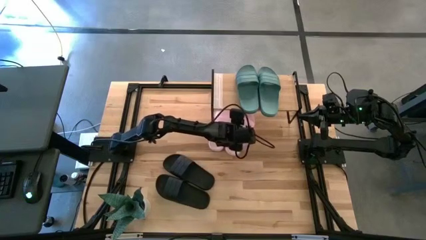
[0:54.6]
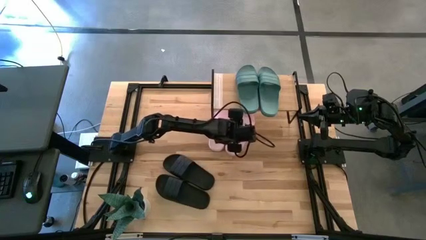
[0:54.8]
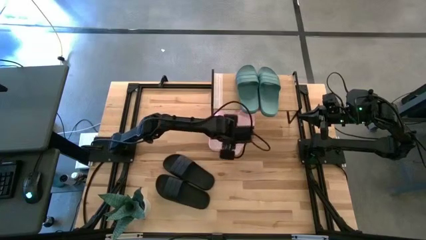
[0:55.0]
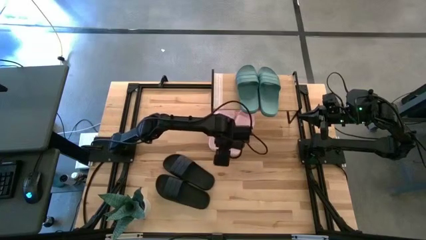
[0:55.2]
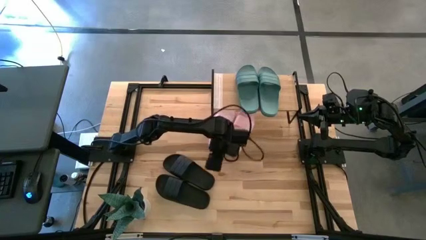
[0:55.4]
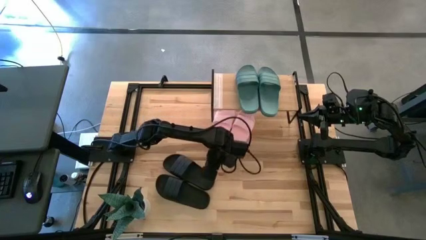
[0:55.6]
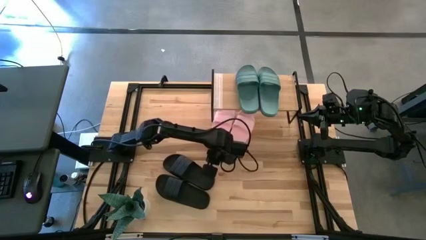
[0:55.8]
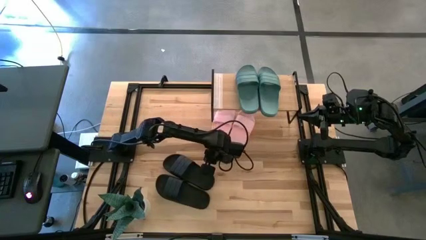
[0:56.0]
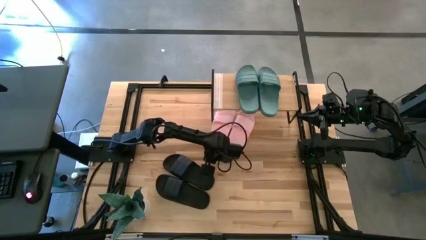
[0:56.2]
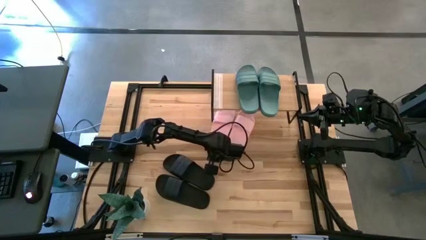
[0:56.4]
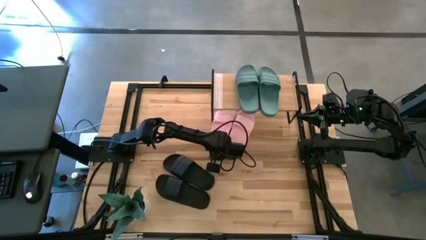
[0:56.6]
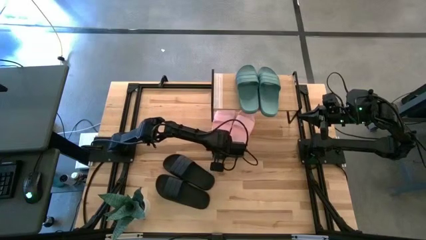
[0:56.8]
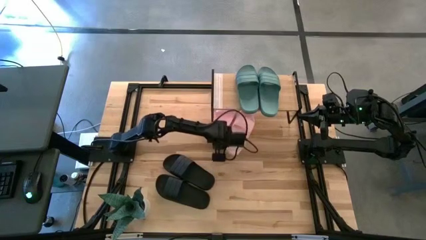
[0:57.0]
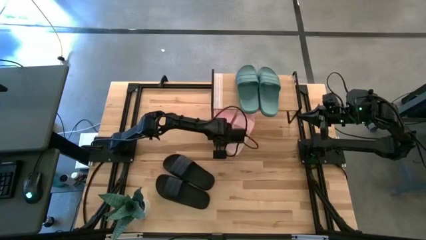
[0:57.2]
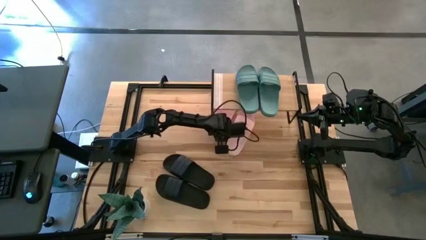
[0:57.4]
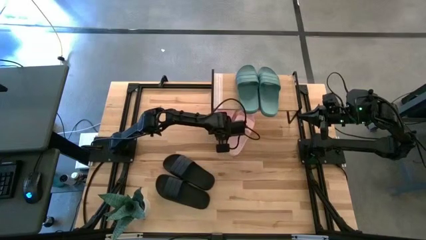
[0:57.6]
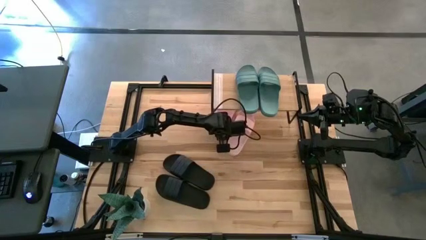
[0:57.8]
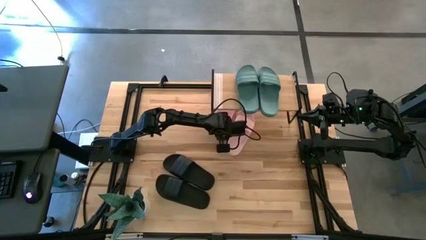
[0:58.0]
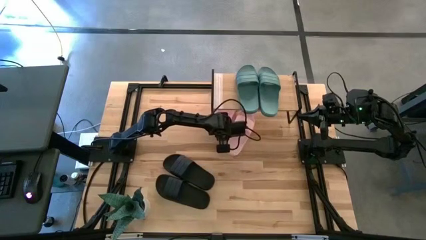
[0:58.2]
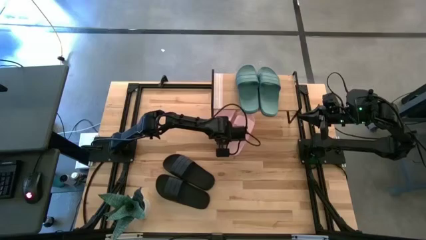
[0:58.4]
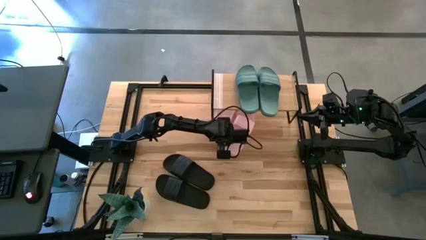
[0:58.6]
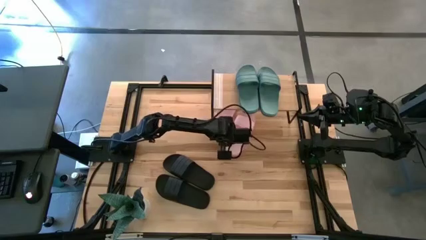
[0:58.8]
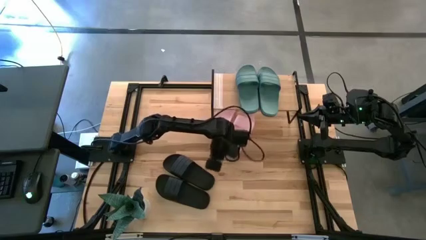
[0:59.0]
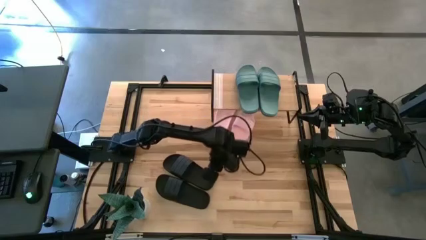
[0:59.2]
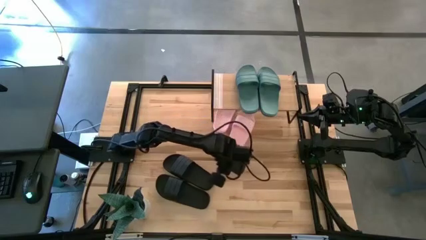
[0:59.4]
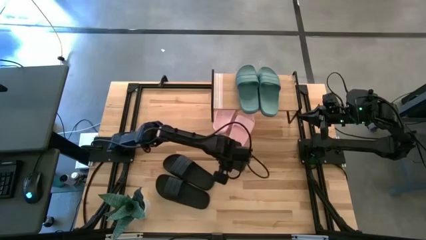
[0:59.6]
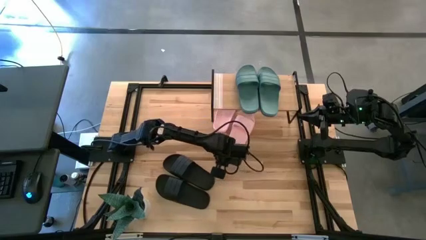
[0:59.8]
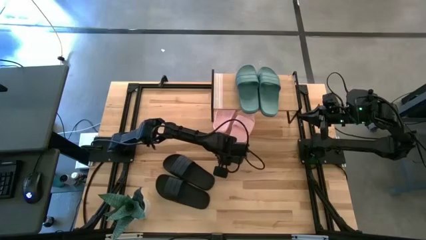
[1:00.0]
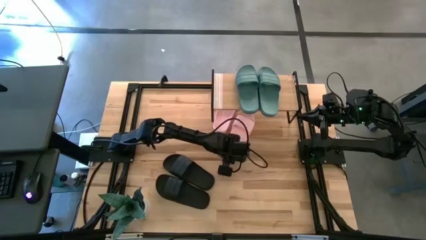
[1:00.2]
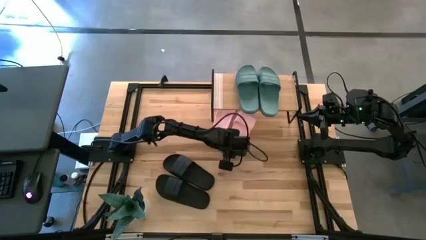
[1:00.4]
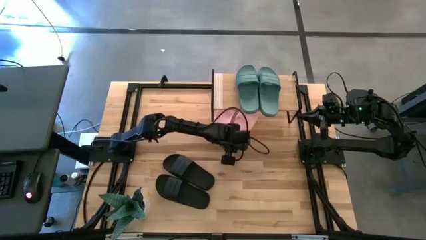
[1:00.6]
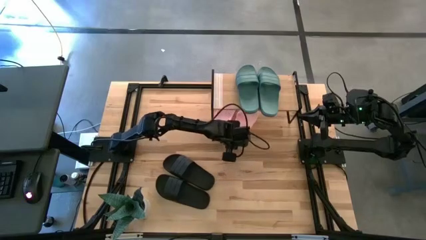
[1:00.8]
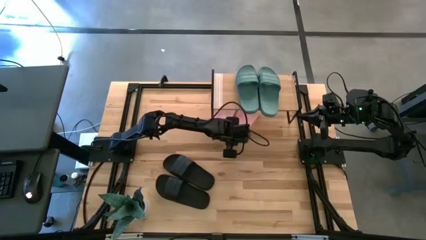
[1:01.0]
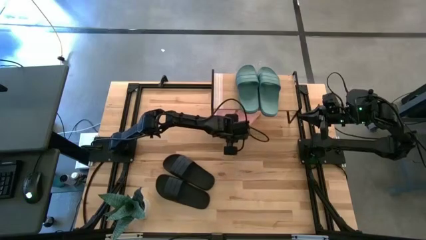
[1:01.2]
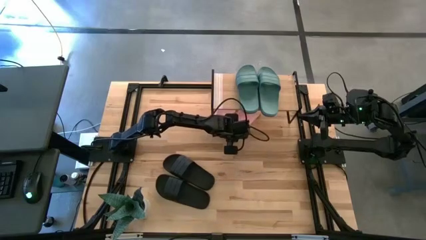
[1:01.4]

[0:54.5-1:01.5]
Task: Pick and place slides into the shelf
Adjust the pink slide under the shelf

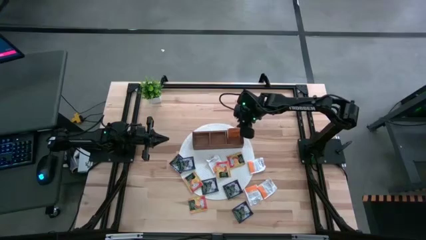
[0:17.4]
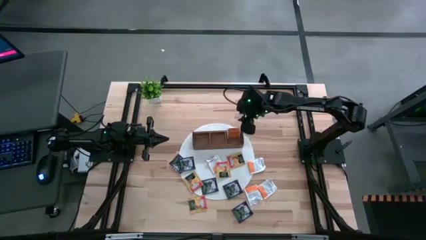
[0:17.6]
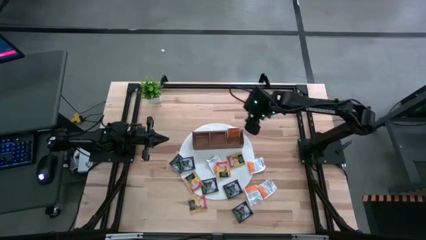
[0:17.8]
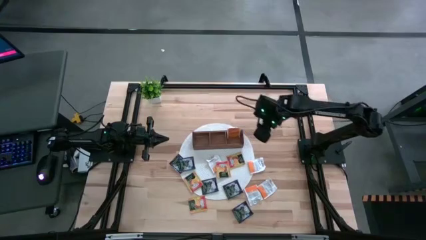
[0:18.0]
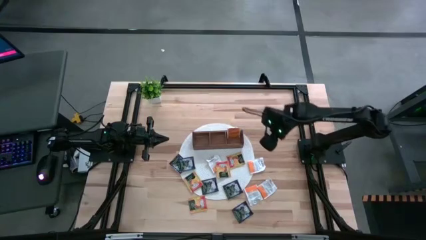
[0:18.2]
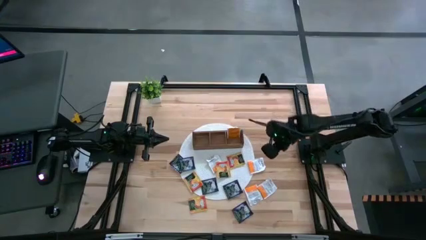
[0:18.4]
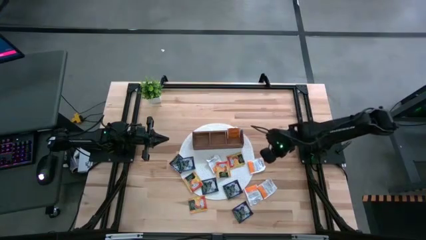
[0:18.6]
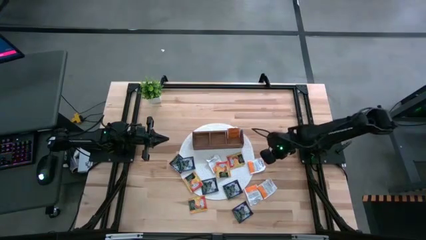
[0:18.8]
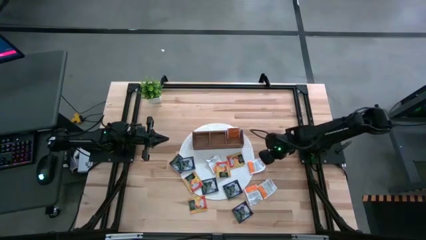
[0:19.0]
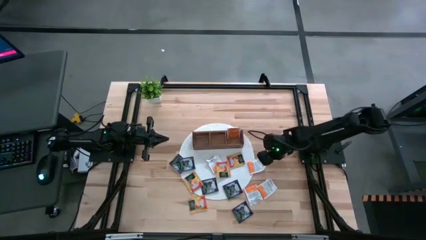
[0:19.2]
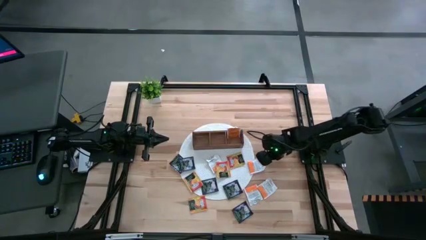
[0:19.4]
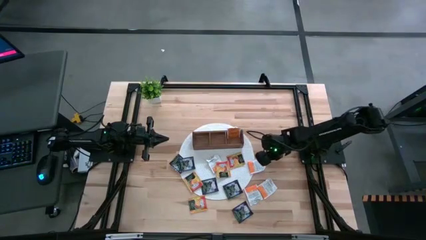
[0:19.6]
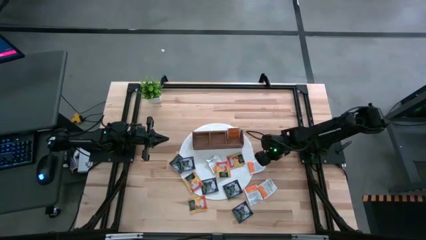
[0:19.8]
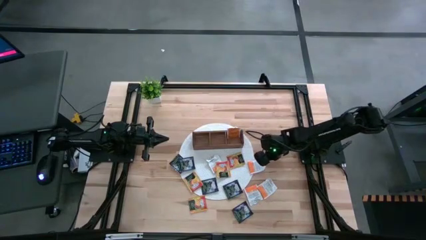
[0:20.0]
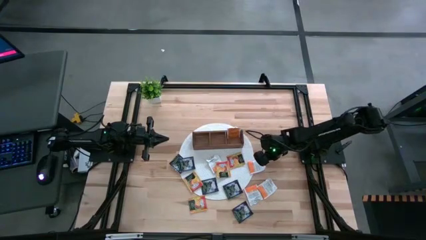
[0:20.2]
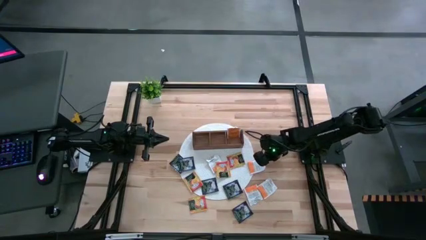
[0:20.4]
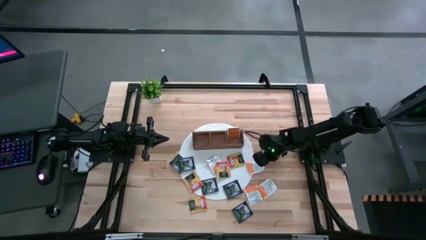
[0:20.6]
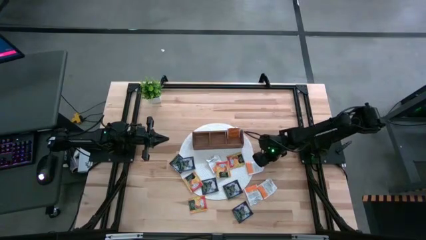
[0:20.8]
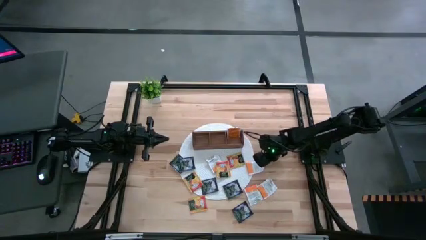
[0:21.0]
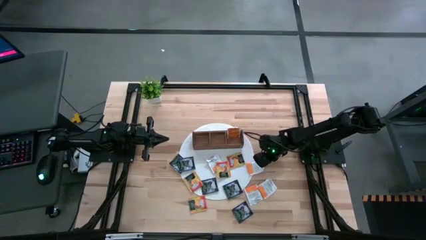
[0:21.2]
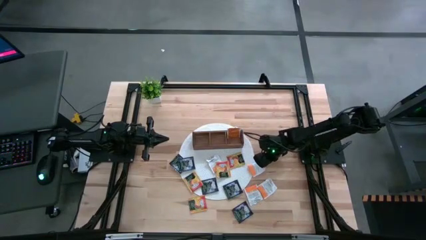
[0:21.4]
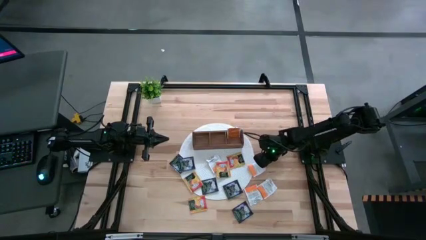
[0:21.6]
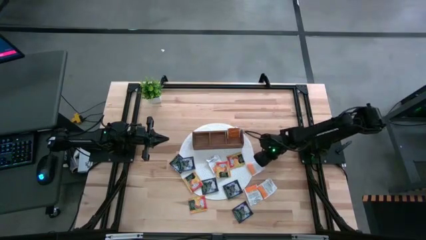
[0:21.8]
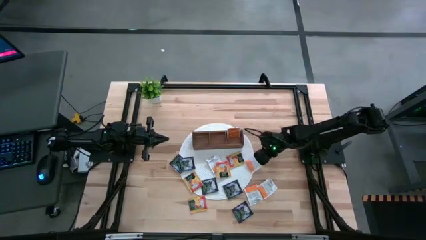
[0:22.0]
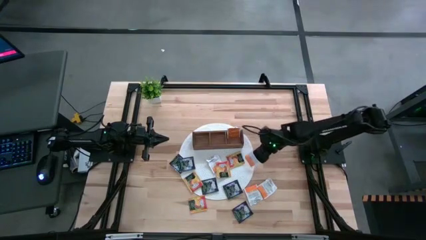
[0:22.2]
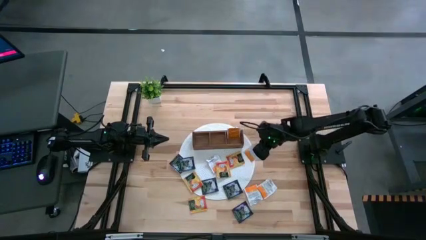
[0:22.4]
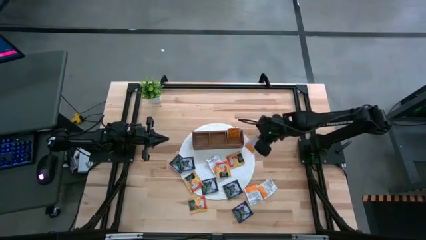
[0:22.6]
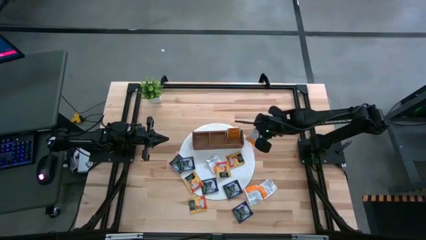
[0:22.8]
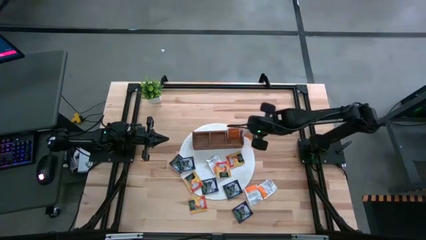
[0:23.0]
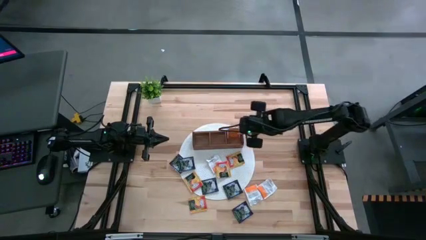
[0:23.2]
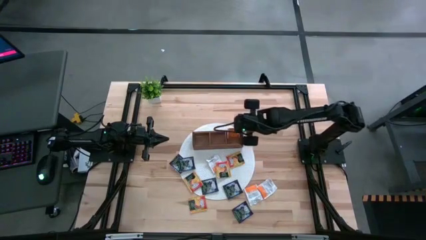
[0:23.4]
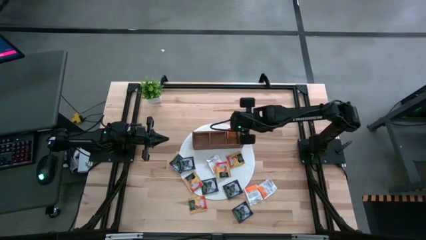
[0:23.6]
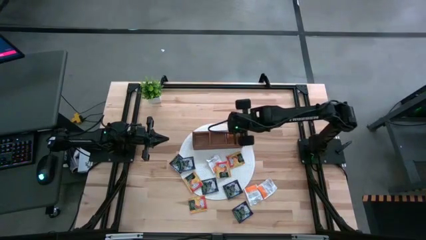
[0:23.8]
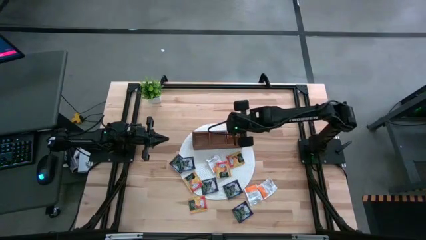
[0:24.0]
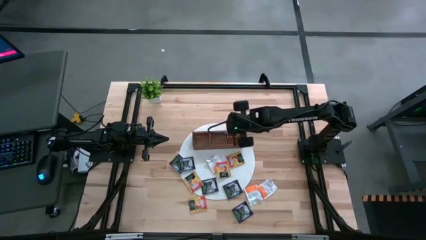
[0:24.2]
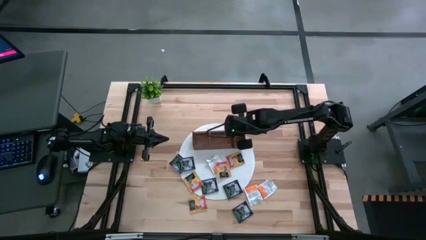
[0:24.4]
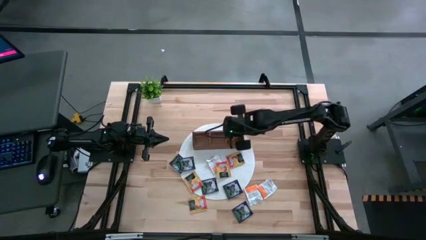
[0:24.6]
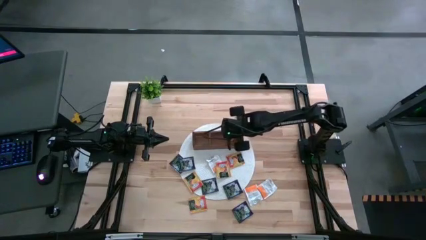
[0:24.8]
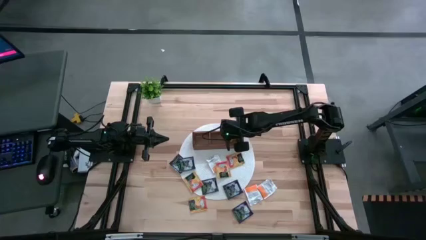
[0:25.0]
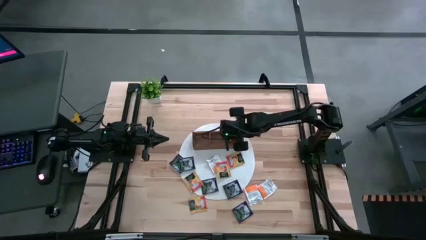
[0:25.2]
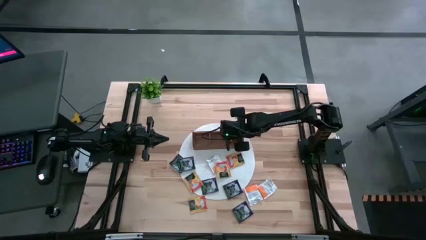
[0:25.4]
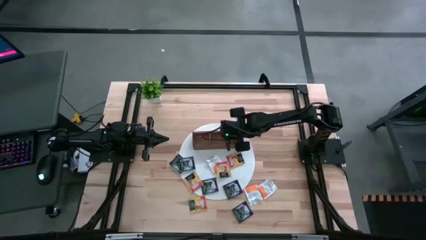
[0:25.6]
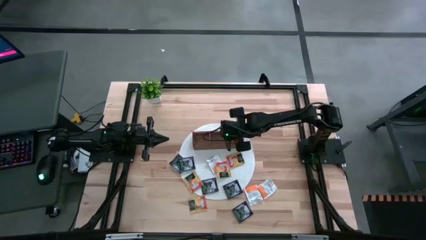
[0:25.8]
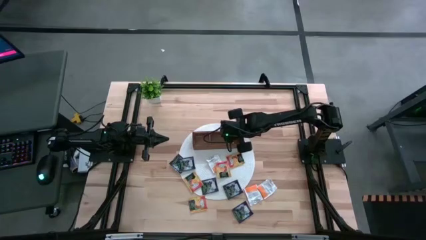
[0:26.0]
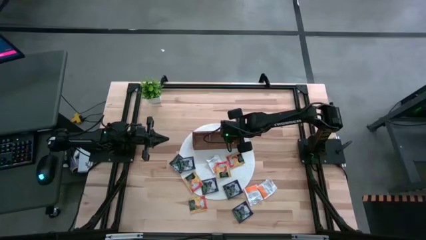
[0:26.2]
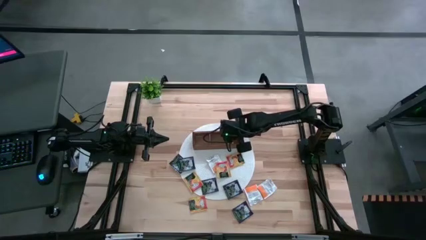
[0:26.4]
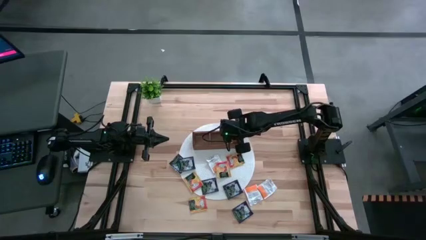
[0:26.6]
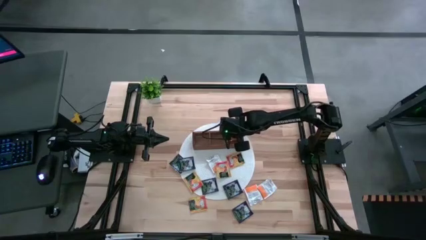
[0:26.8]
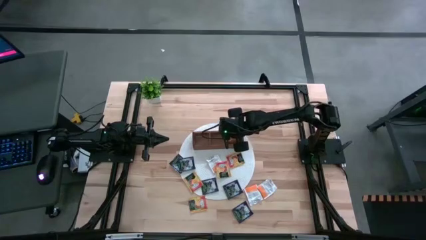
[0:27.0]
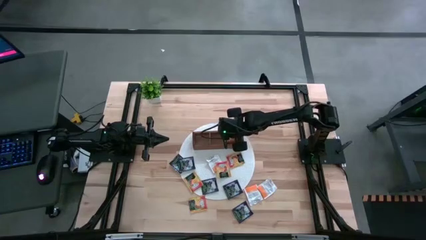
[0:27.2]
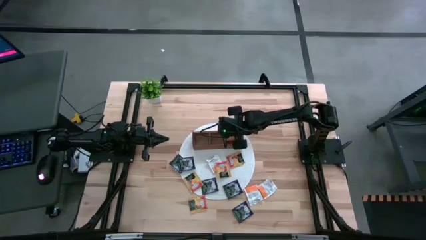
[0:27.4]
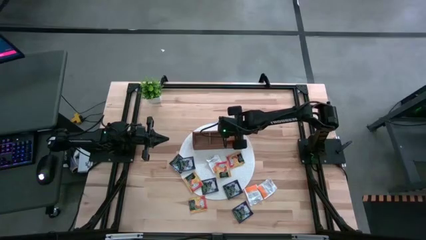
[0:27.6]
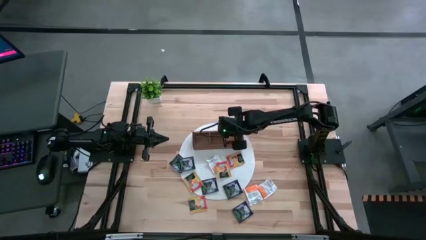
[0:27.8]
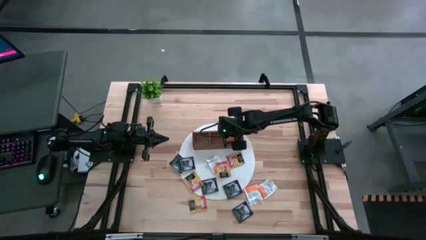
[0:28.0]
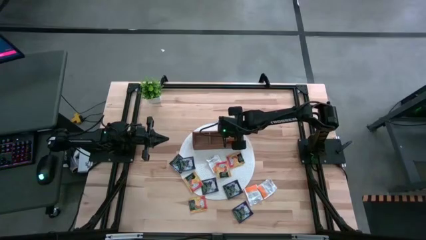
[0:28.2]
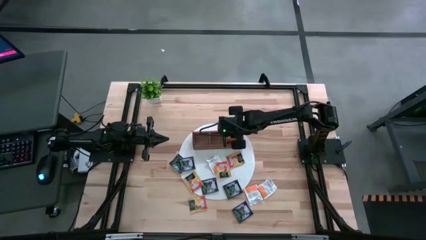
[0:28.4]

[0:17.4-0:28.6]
Task: Pick & Place Tea
Put the white tea bag into the right section of the wooden organizer
